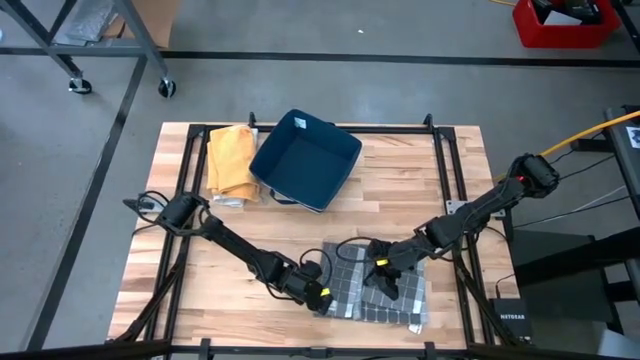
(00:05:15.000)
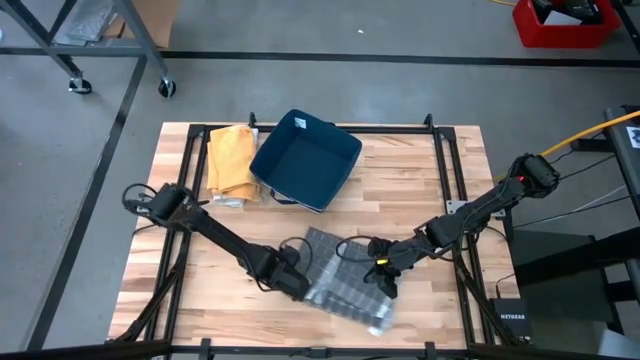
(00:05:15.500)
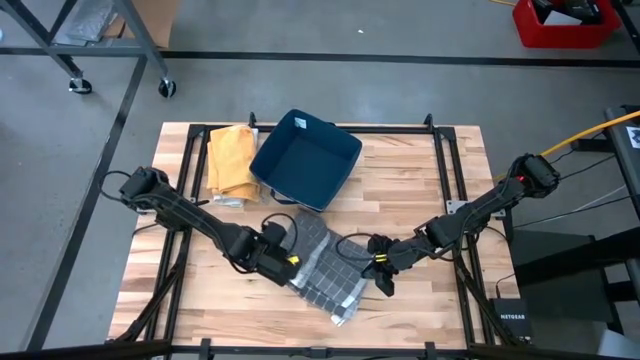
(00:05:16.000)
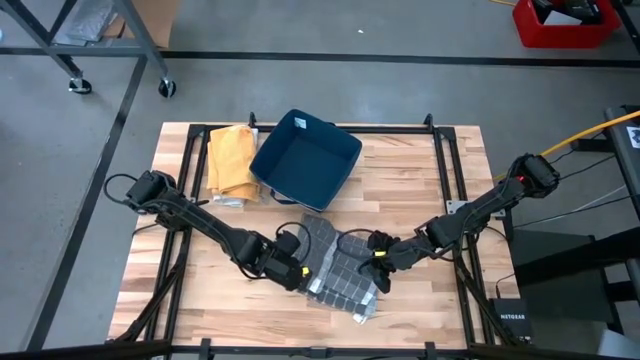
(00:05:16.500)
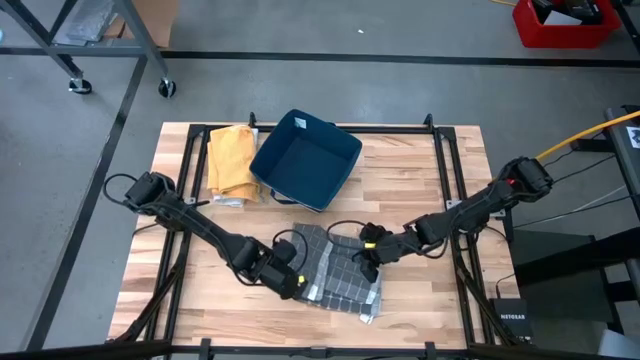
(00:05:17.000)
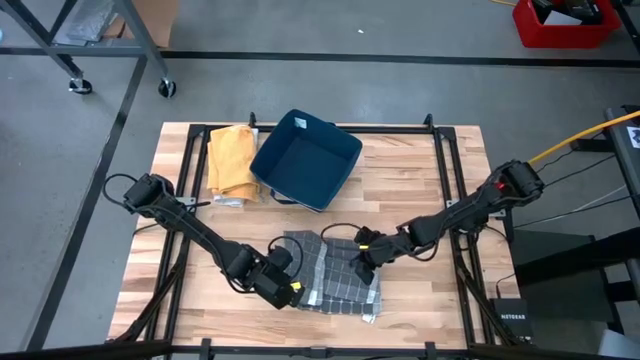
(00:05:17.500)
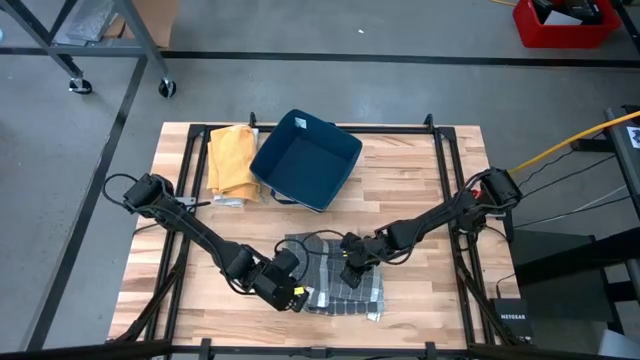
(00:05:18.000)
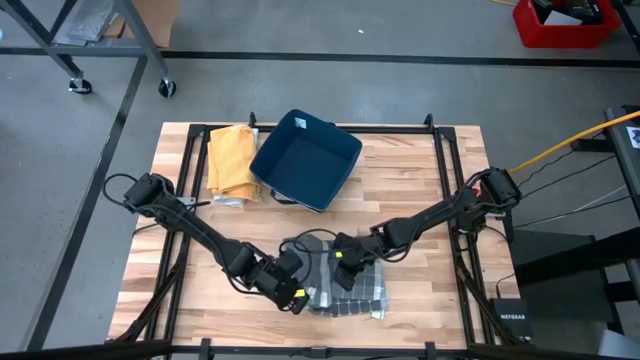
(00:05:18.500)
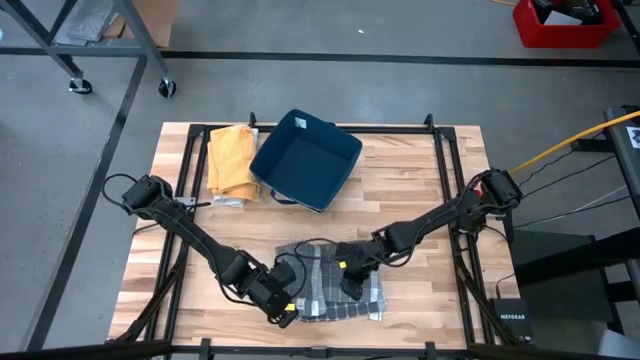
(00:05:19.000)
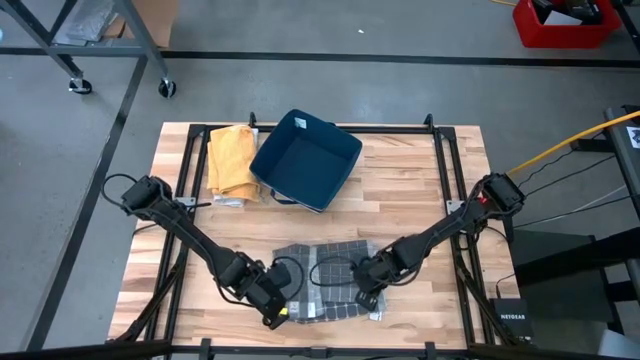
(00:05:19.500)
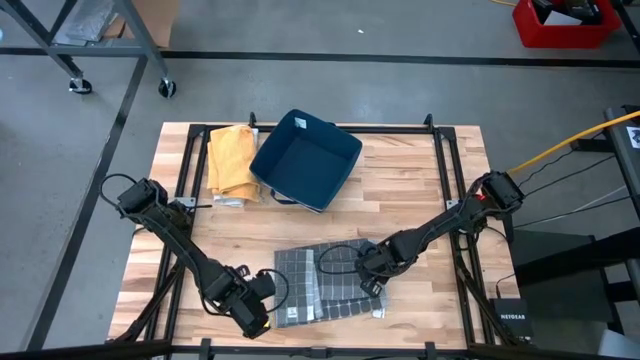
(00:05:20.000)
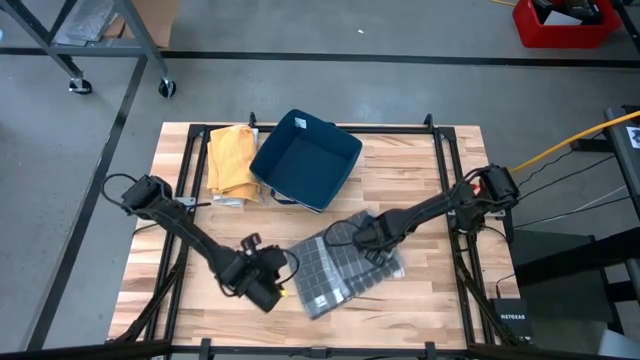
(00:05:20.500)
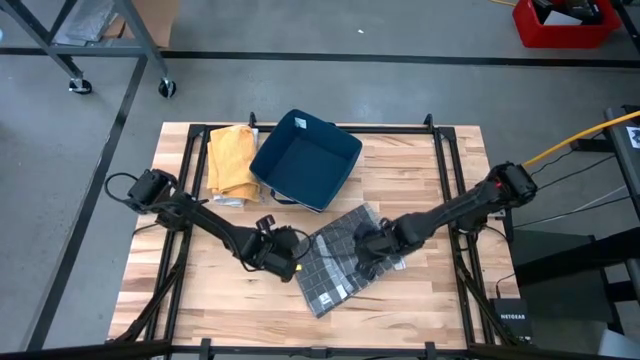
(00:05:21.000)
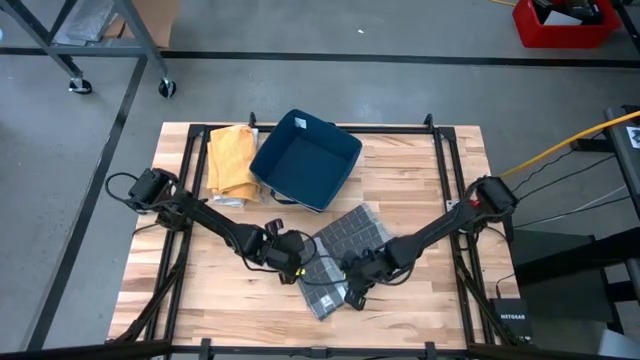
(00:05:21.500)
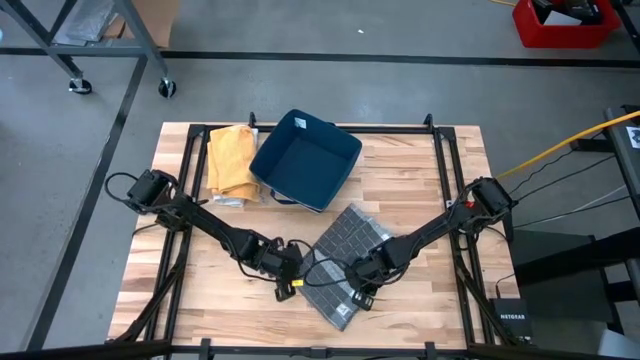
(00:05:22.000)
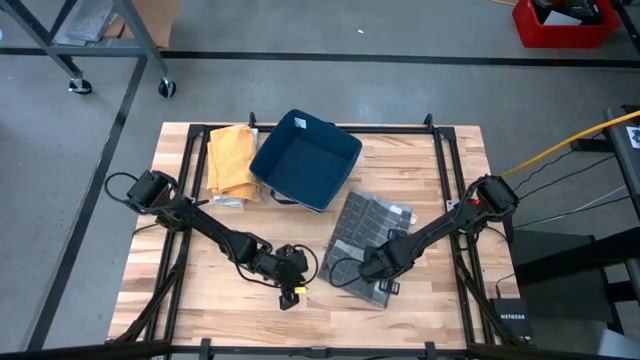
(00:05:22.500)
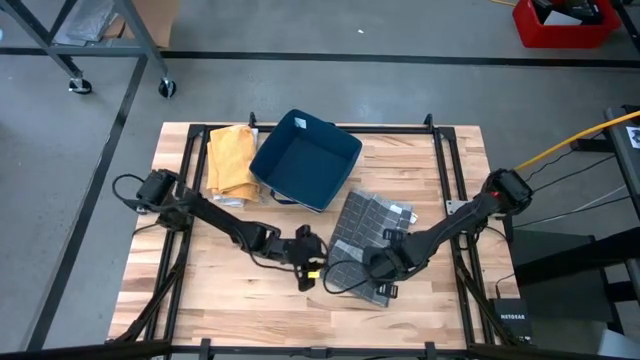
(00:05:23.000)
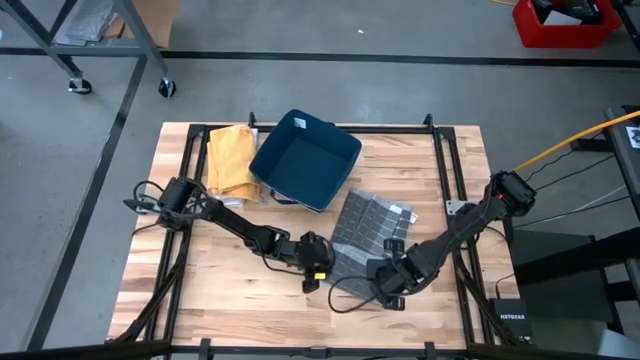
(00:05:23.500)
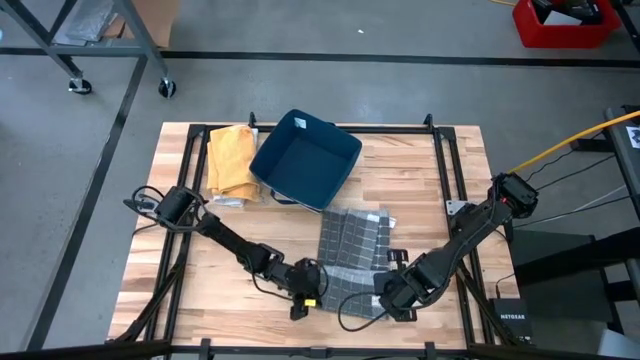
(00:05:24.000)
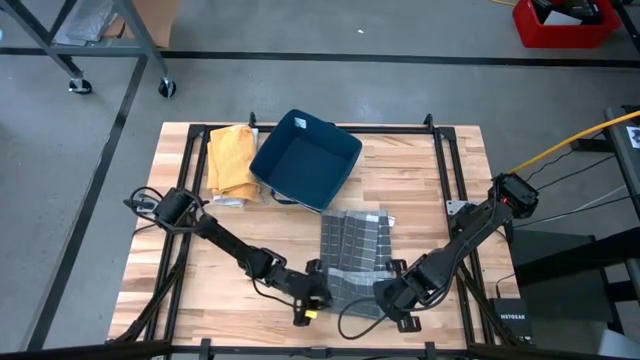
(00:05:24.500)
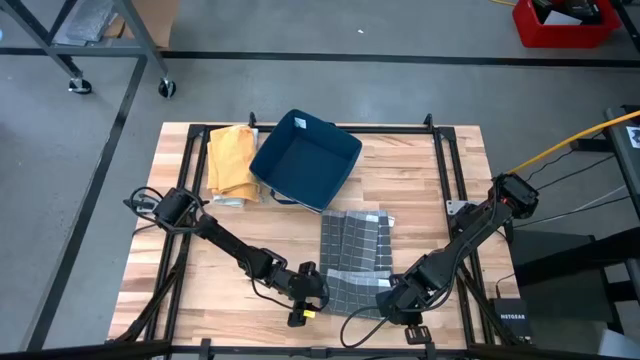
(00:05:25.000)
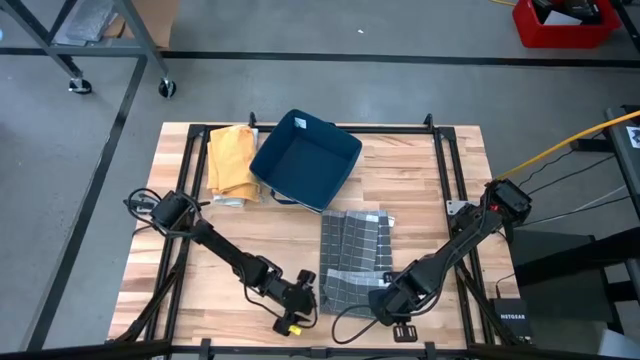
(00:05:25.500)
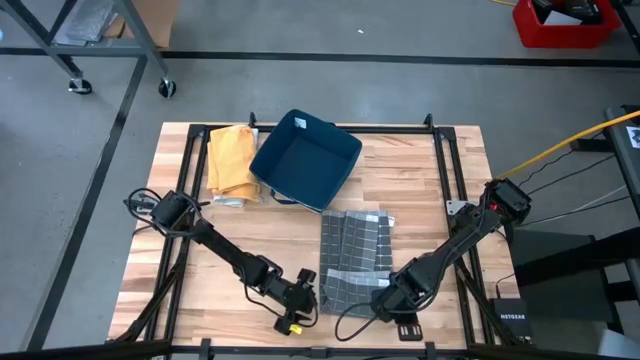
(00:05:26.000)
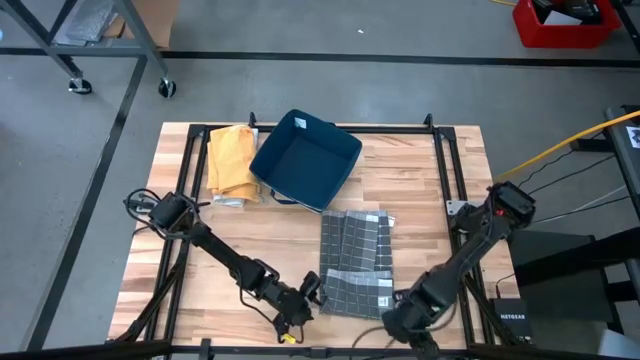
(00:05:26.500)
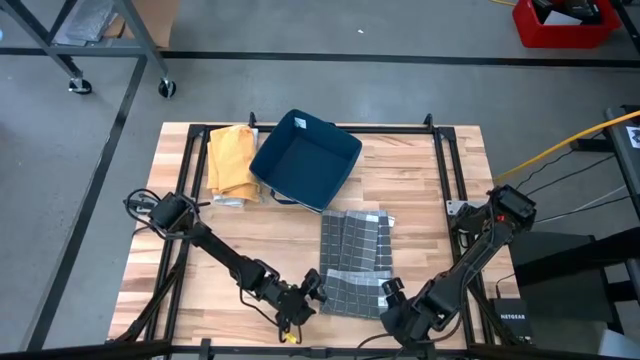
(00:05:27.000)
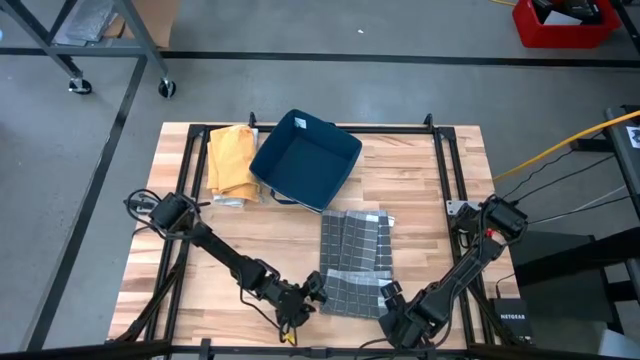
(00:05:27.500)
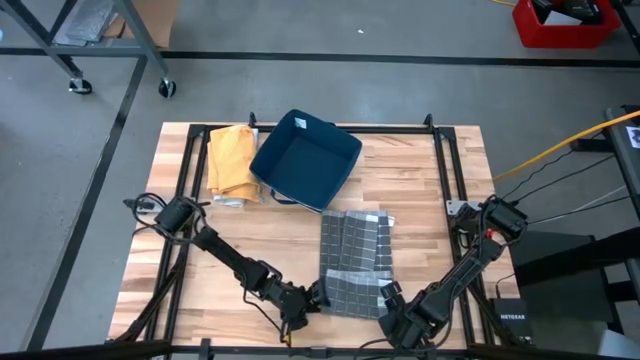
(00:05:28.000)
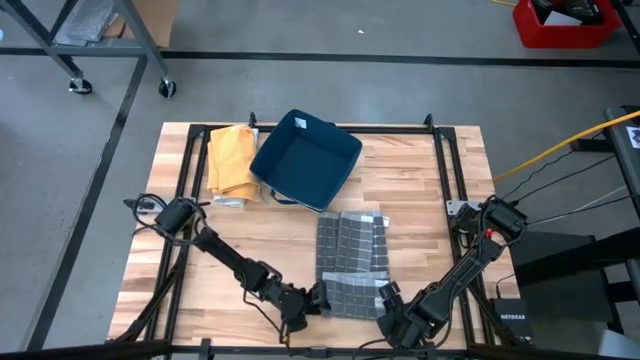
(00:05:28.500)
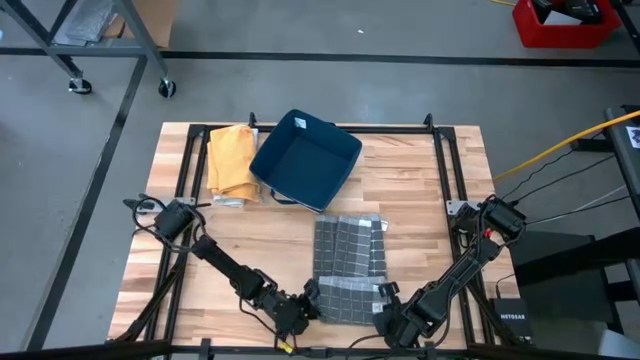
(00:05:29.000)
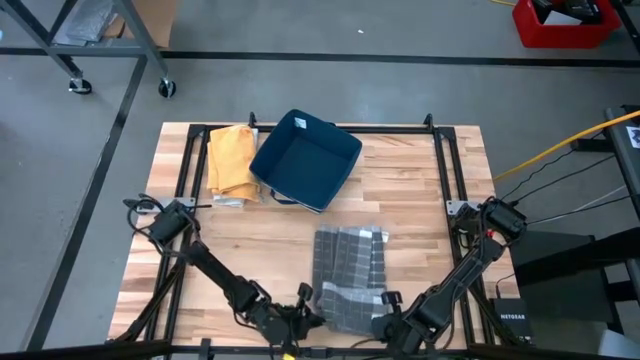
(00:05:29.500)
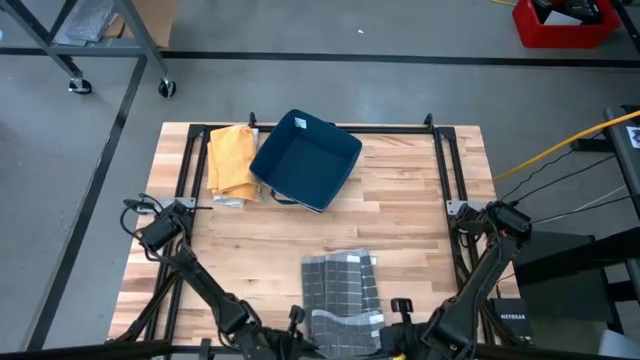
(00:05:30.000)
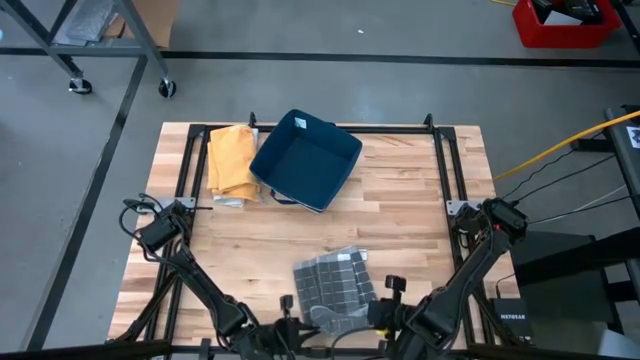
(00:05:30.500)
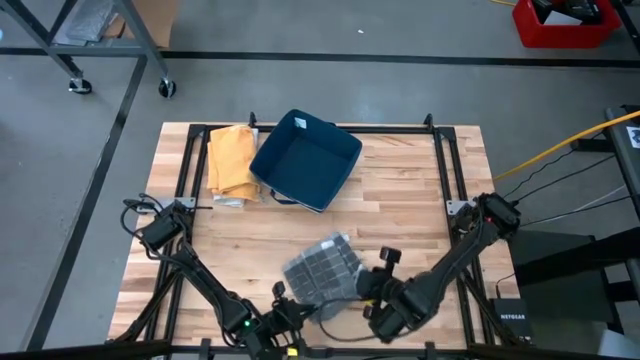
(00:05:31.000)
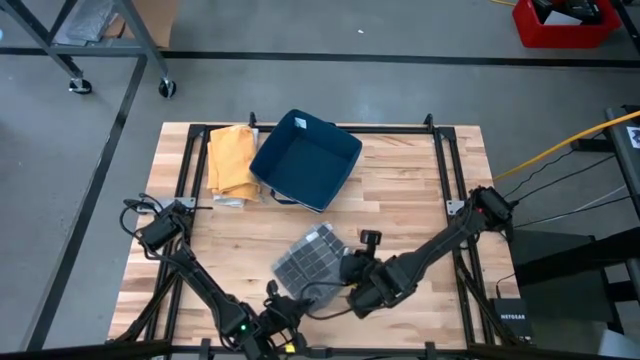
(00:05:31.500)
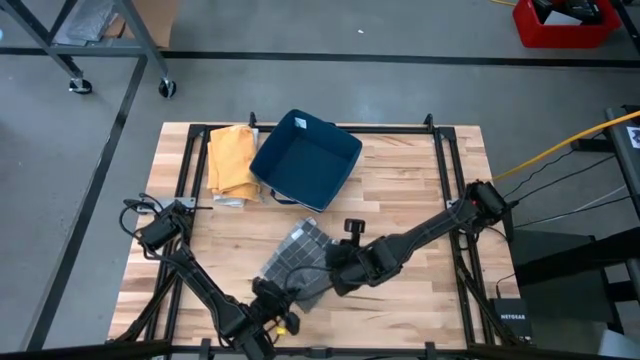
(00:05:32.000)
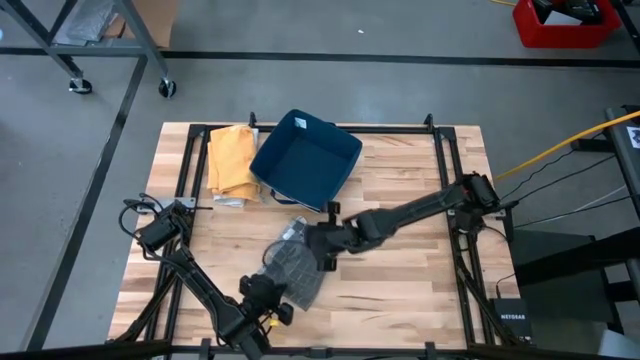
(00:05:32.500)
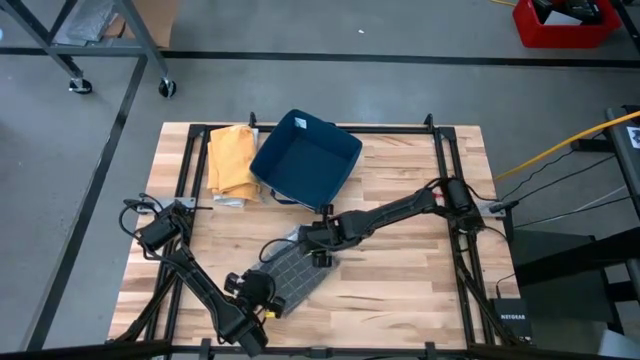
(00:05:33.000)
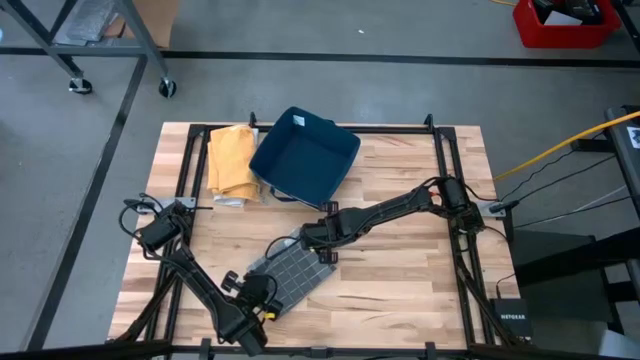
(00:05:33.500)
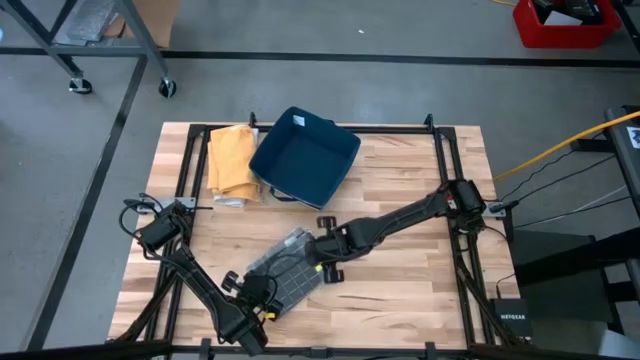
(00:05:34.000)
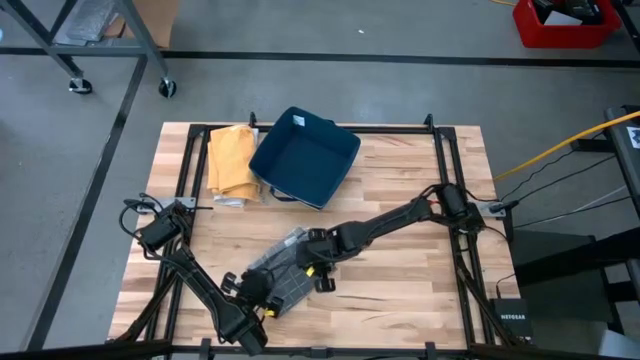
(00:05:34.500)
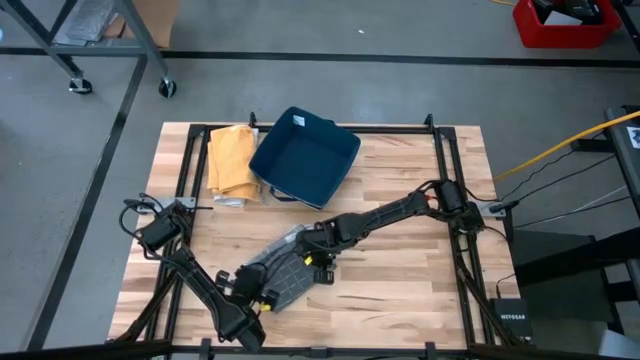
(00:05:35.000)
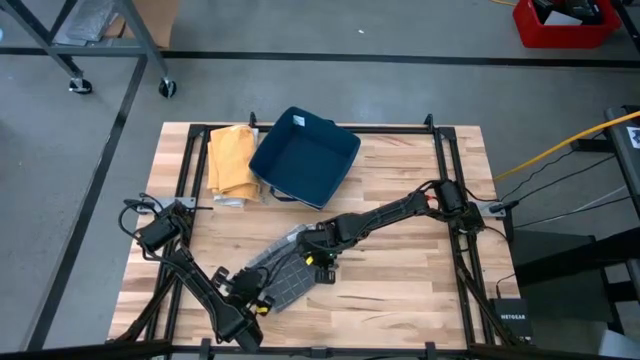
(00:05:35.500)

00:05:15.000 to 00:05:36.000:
Task: Fold towel
Fold the gray patterned towel

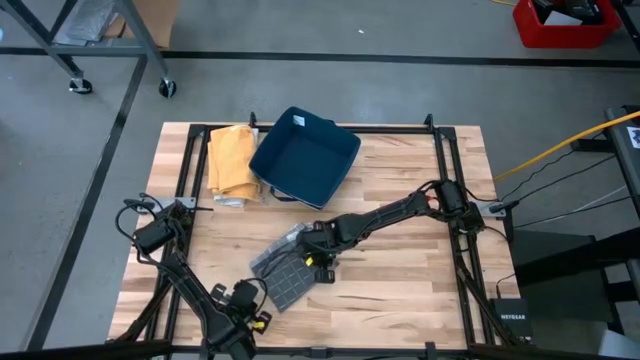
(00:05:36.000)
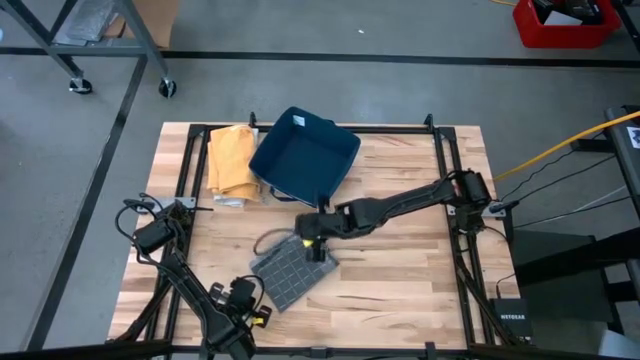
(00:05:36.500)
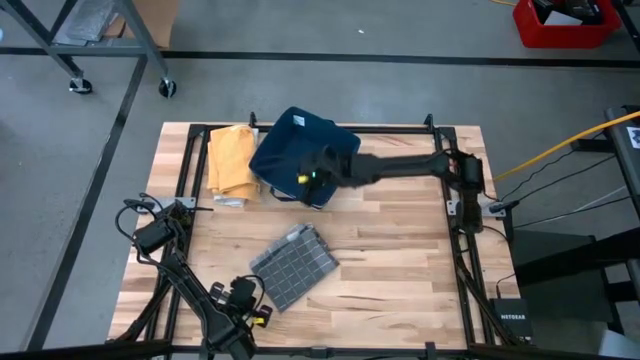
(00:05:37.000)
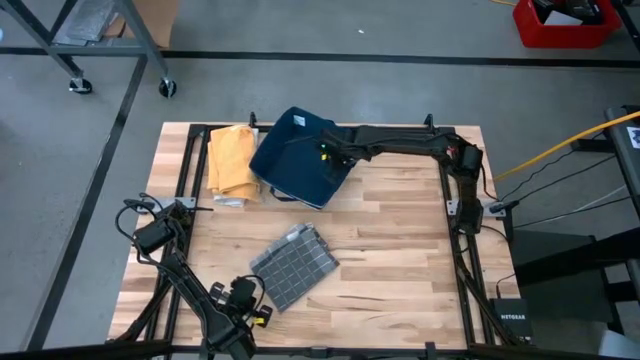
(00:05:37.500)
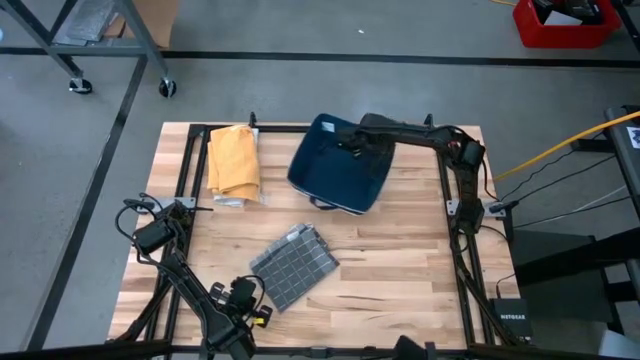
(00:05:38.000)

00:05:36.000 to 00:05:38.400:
Move the blue laundry bin to the top right
